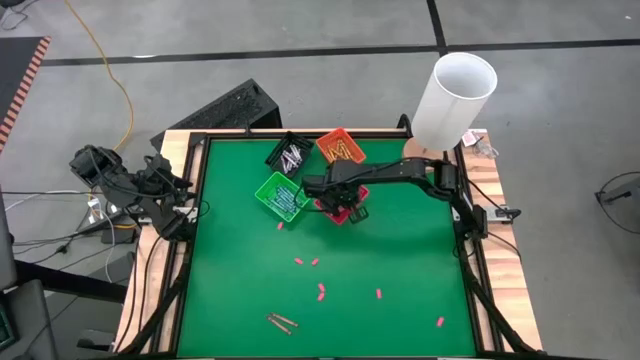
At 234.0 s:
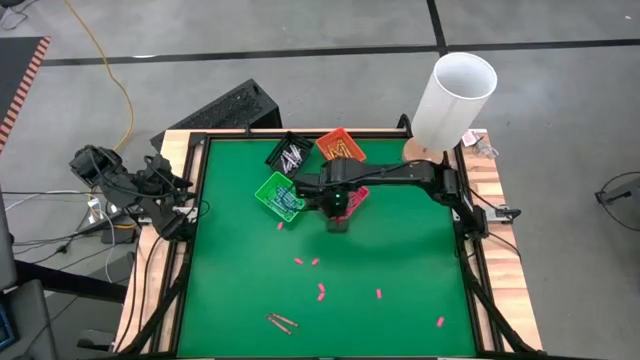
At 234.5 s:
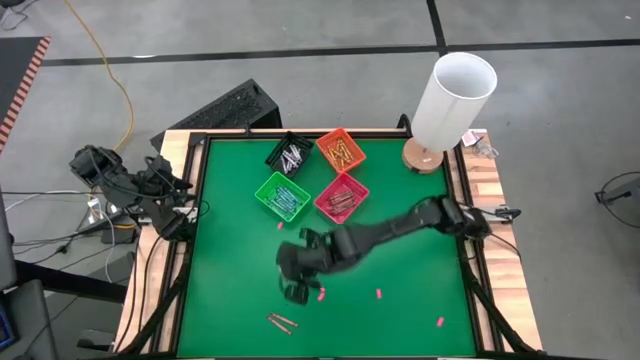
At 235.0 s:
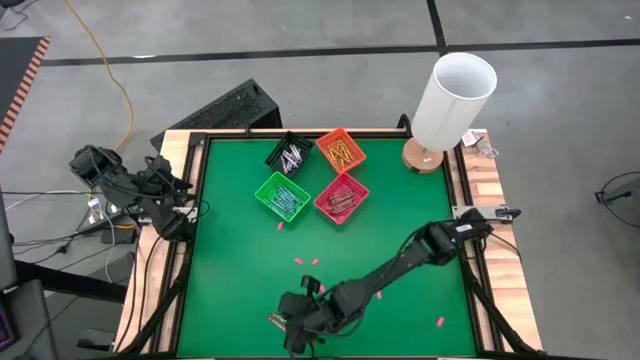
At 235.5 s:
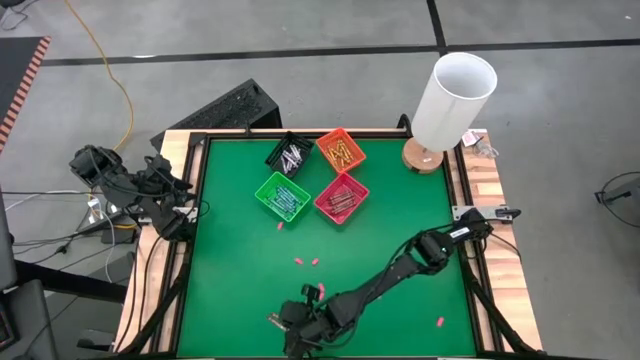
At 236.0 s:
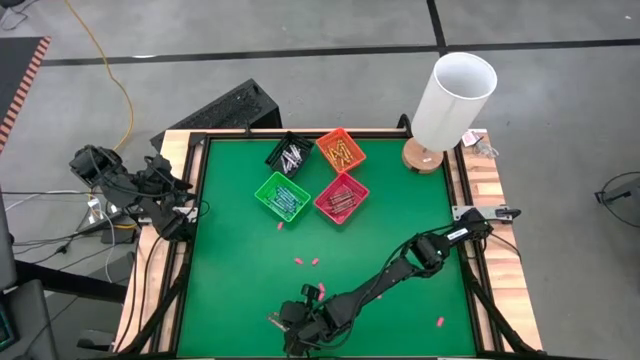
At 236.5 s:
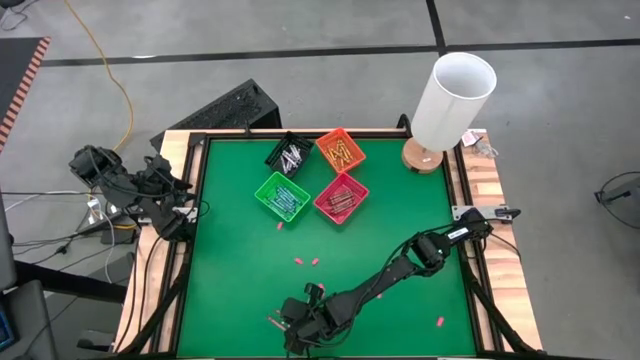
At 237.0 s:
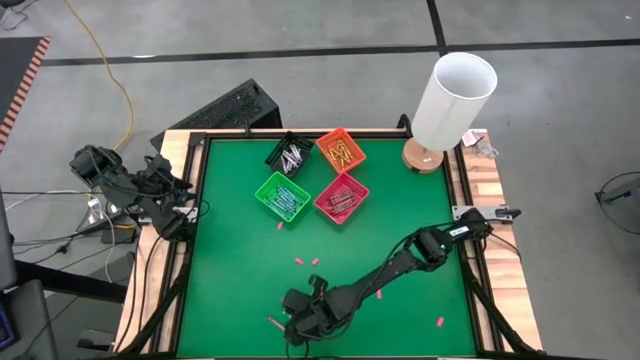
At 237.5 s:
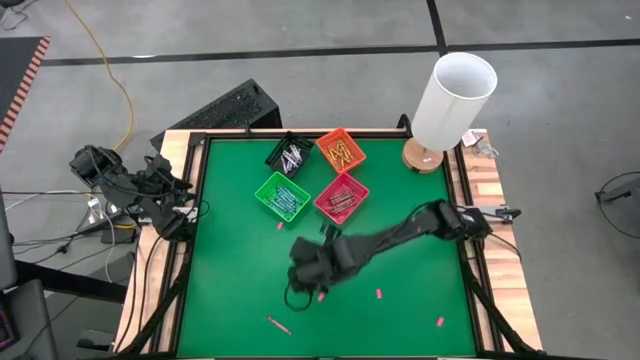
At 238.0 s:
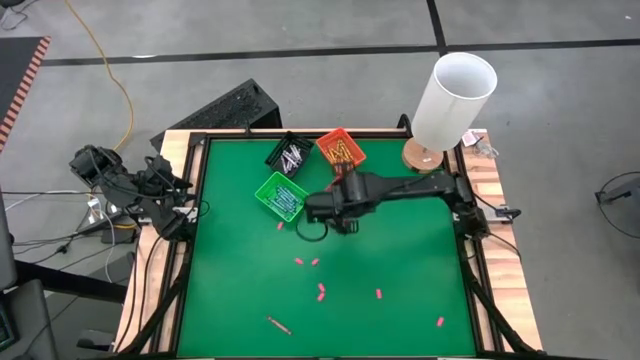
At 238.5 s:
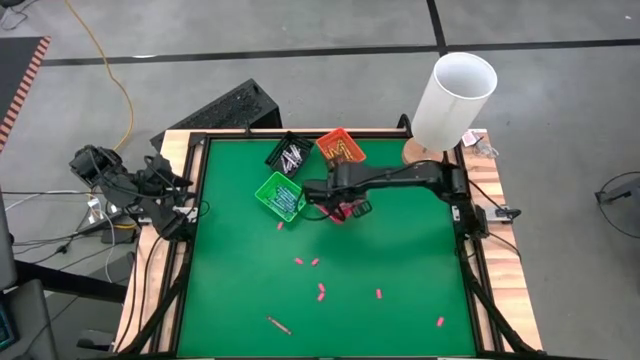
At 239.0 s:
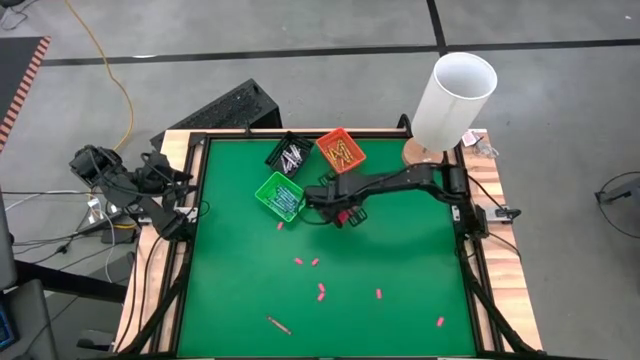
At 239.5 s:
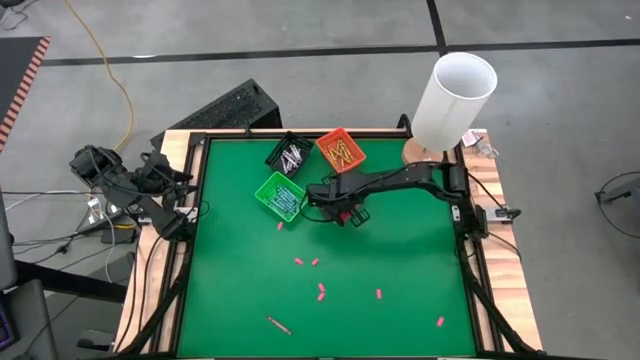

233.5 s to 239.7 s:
Task: Sort crayons
Put the brown crayon into the bin

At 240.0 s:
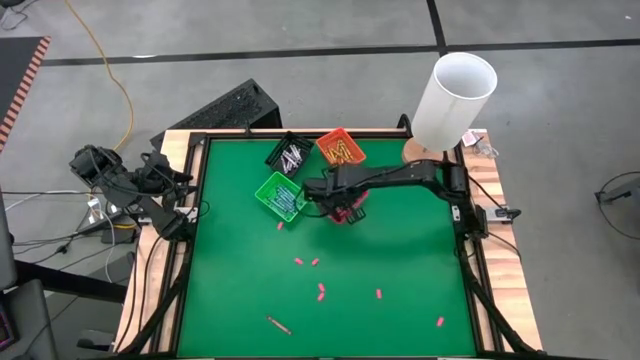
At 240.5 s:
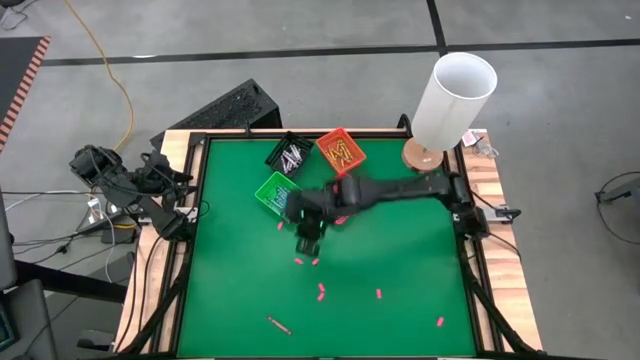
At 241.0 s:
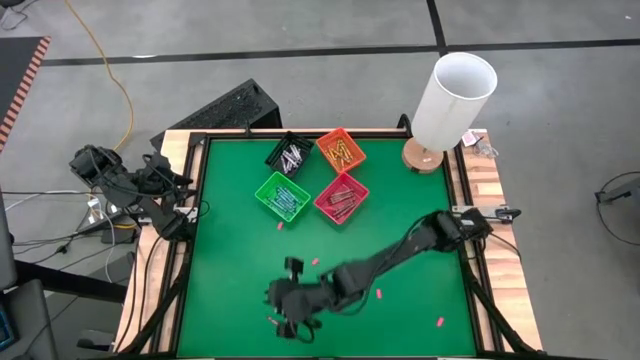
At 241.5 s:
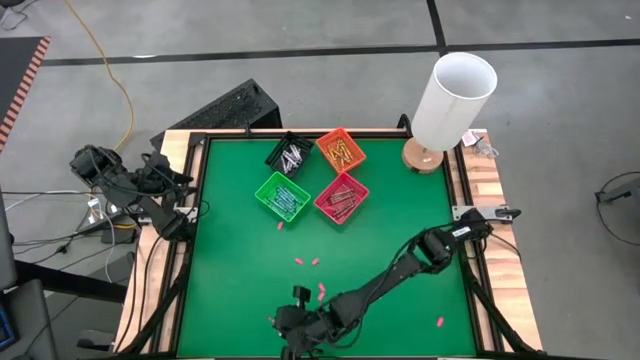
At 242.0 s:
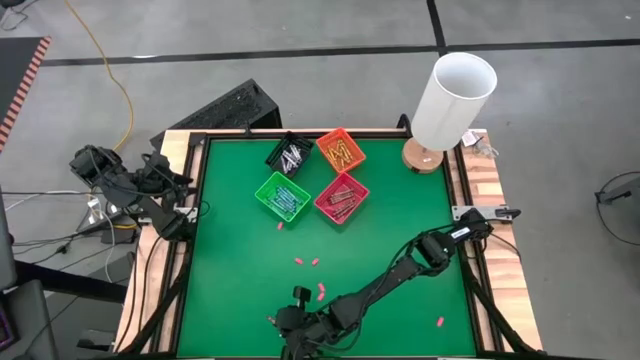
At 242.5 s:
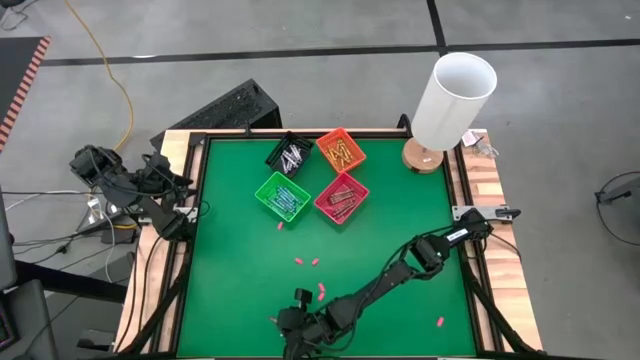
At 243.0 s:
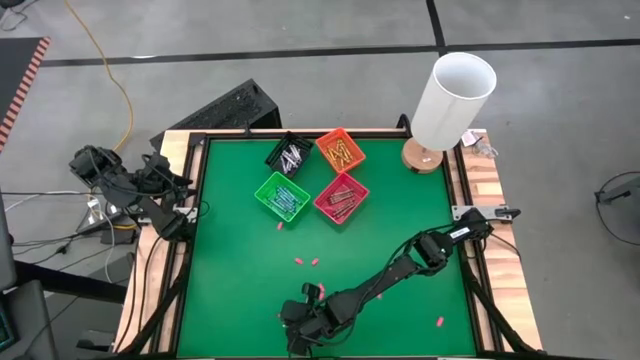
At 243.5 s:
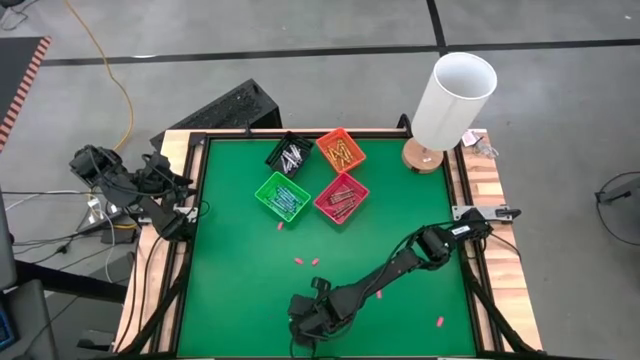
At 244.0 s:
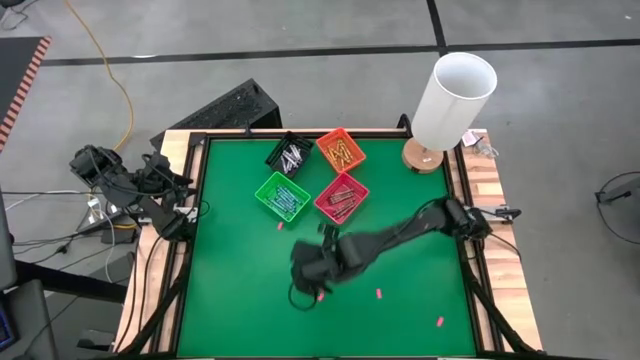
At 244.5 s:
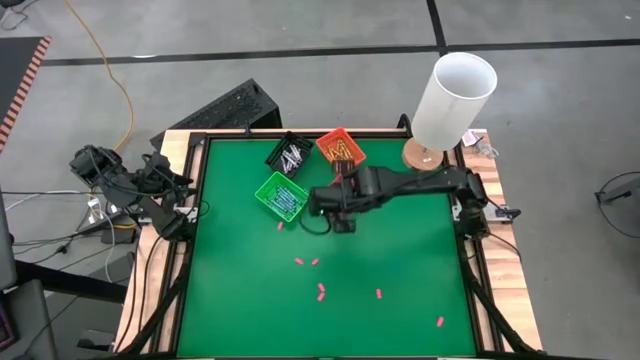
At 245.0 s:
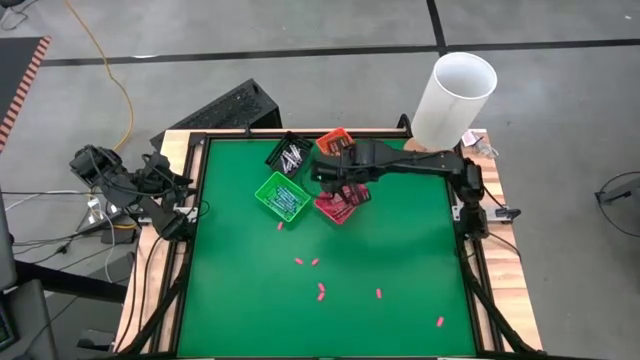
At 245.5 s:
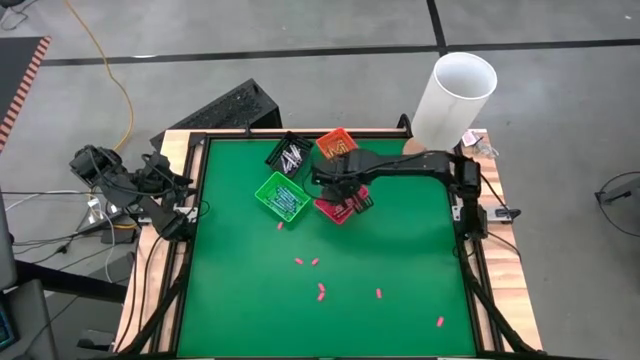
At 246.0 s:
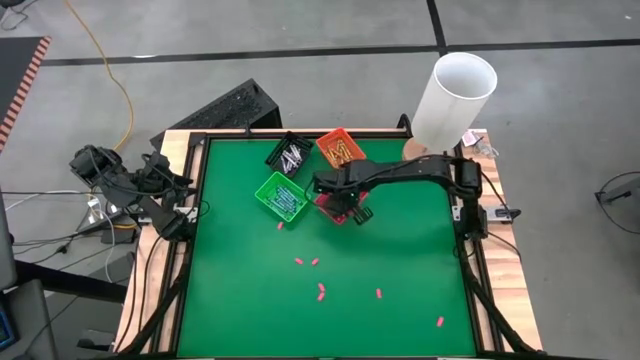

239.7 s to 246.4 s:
Put the brown crayon into the bin

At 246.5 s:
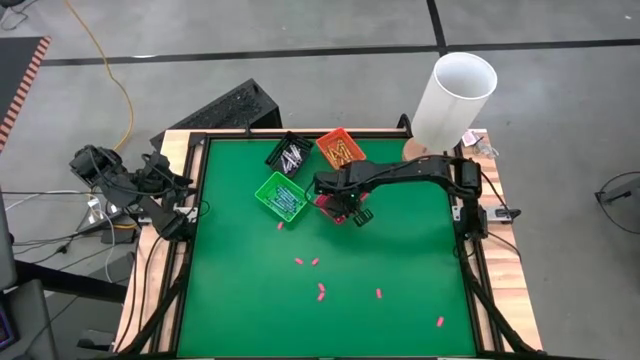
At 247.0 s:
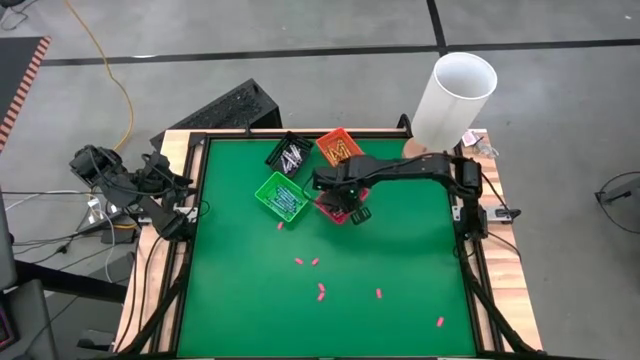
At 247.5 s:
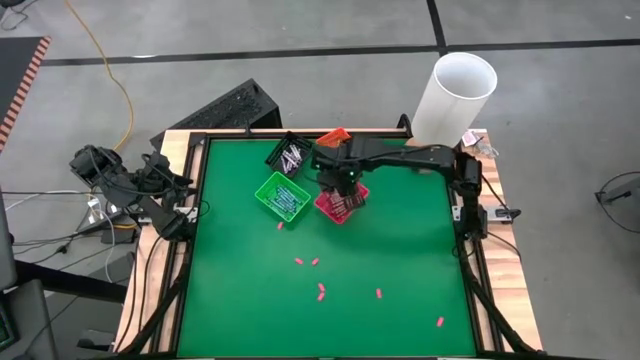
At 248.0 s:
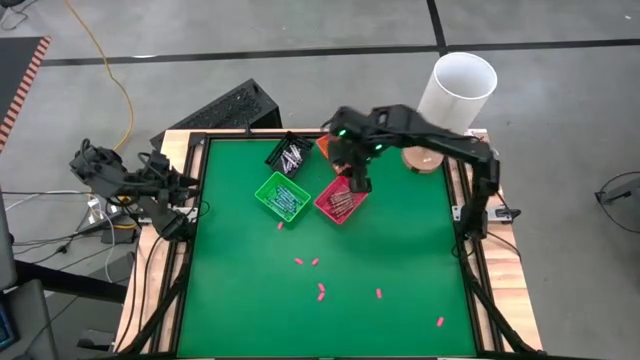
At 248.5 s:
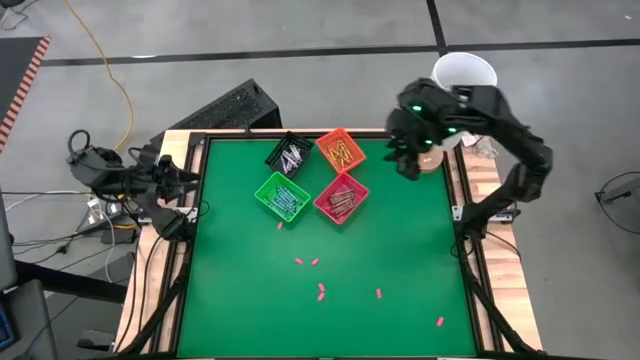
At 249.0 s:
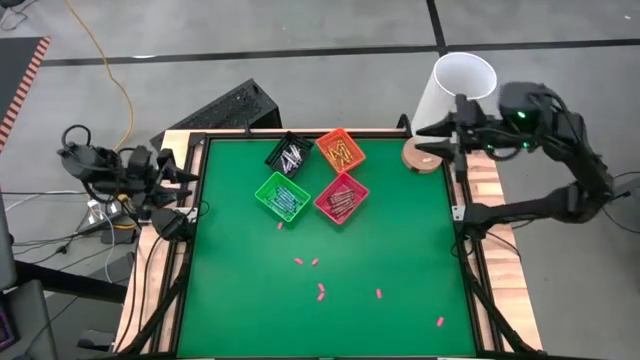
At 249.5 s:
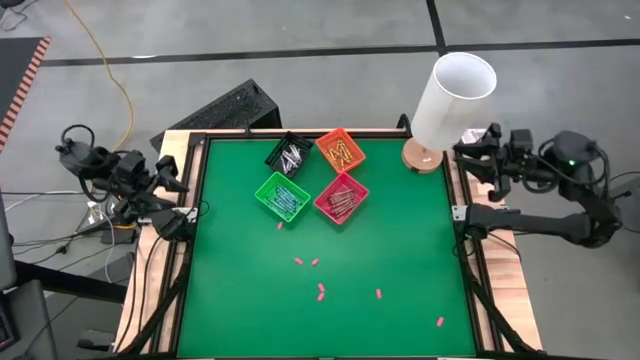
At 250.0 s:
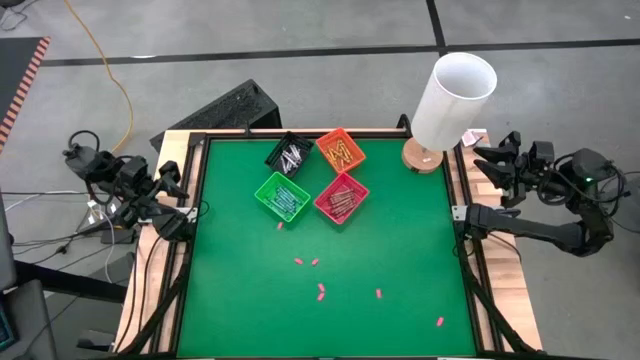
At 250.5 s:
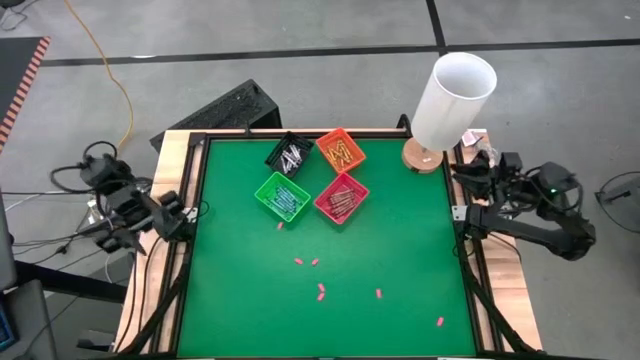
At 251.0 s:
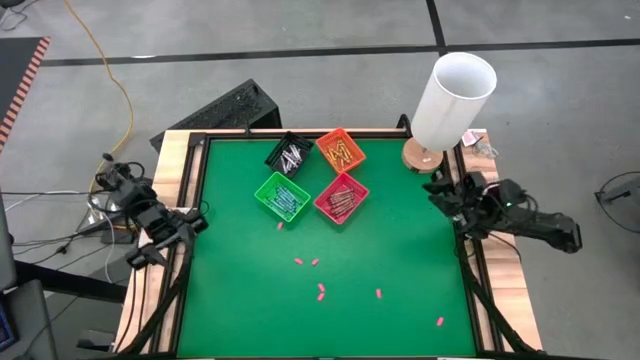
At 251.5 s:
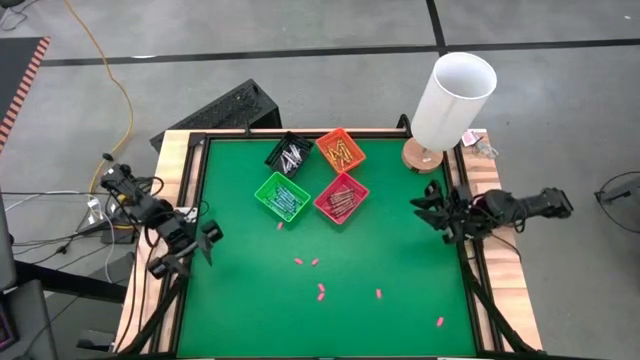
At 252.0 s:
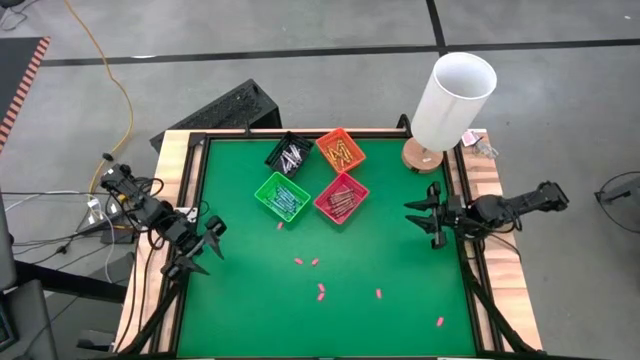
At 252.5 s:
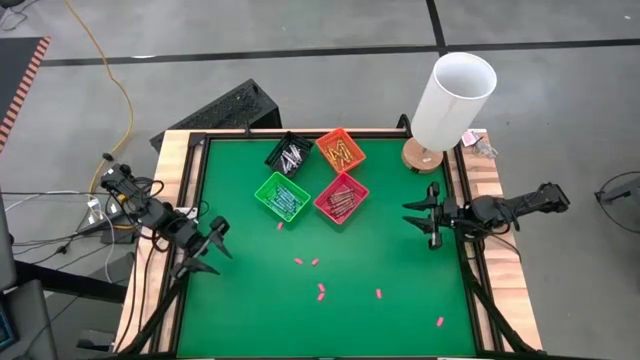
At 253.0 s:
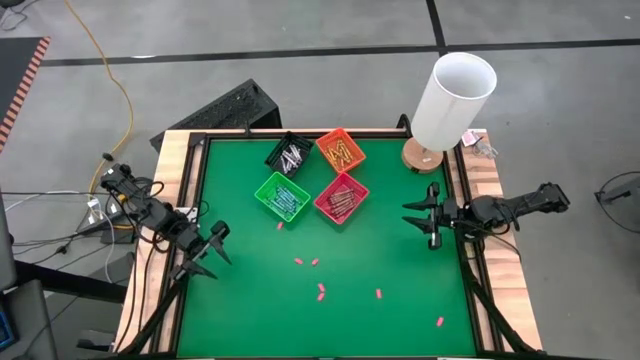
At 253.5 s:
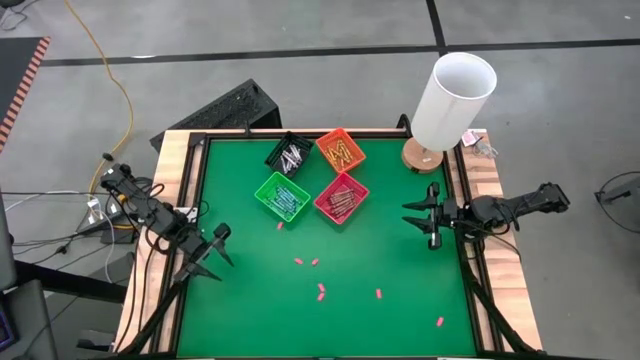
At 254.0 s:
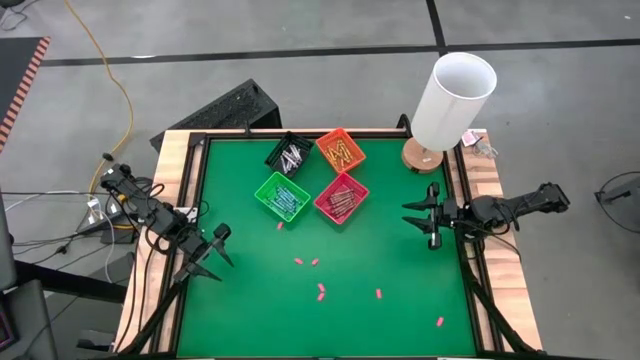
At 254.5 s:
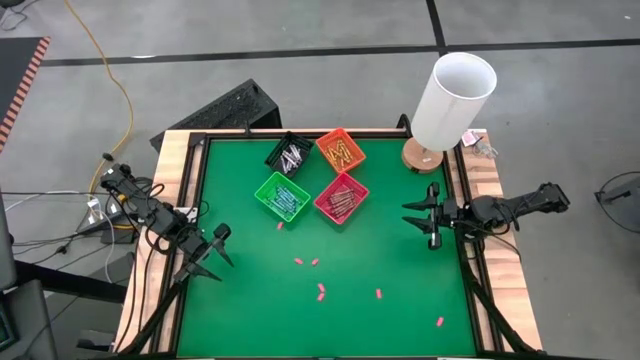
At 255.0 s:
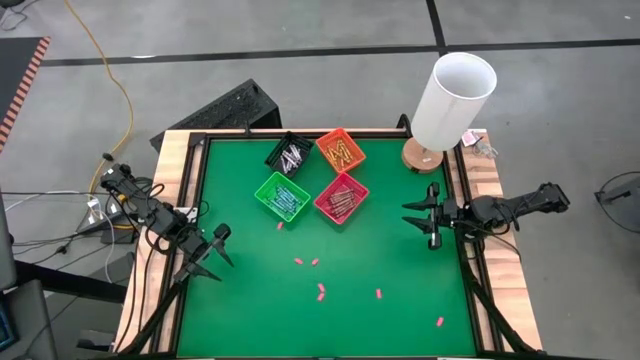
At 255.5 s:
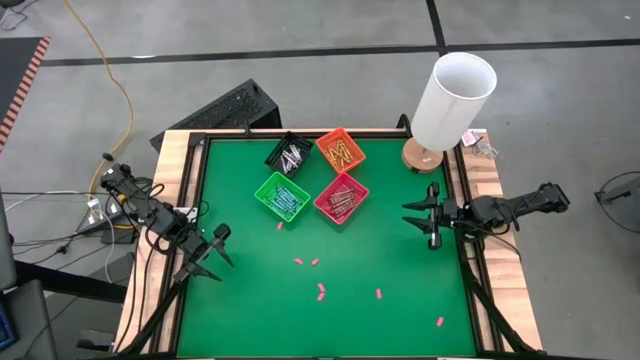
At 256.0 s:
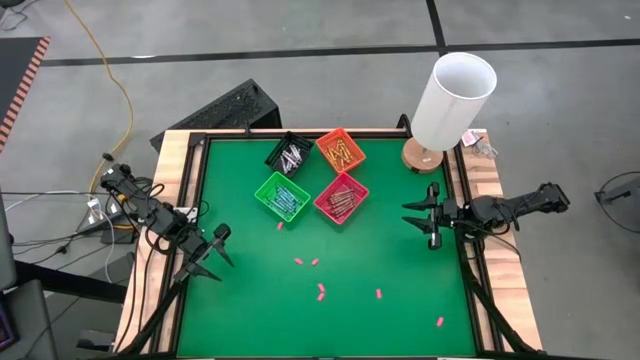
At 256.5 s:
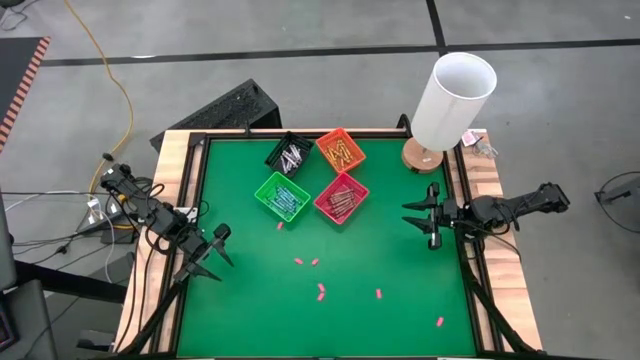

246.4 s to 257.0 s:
Return to Home Position
